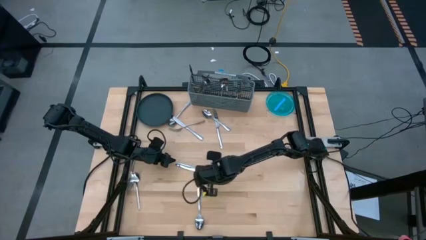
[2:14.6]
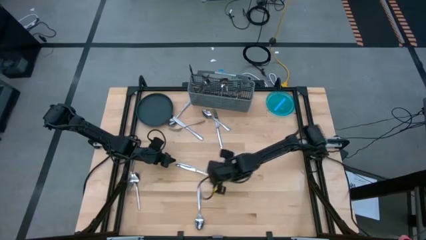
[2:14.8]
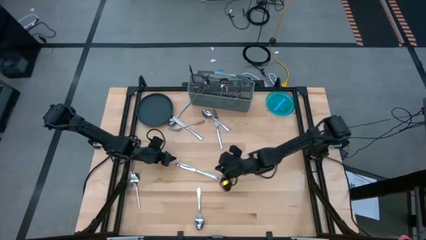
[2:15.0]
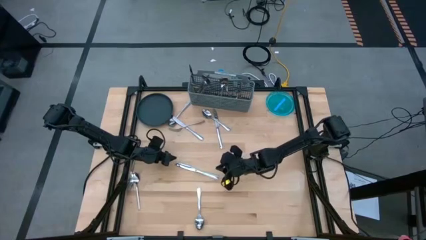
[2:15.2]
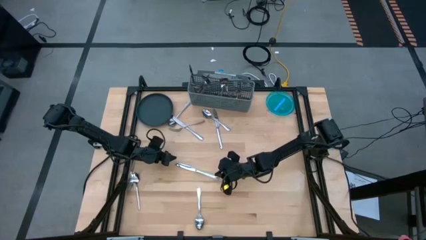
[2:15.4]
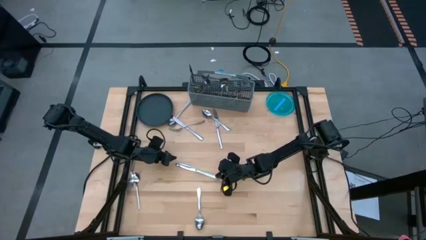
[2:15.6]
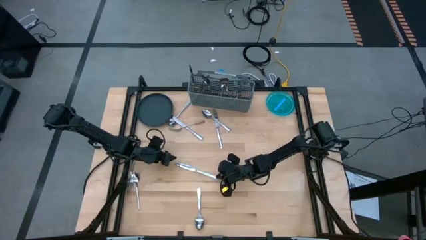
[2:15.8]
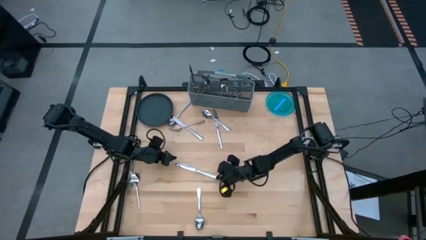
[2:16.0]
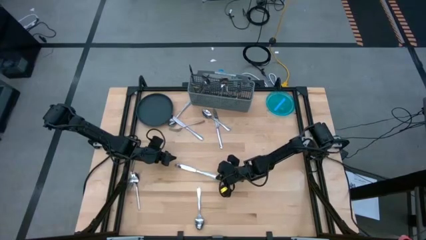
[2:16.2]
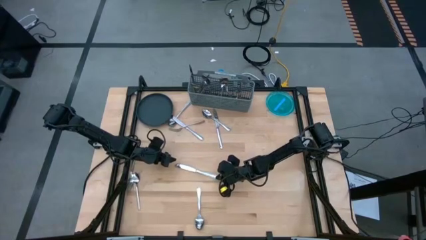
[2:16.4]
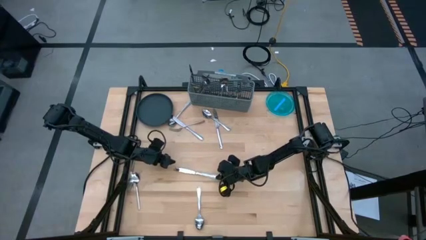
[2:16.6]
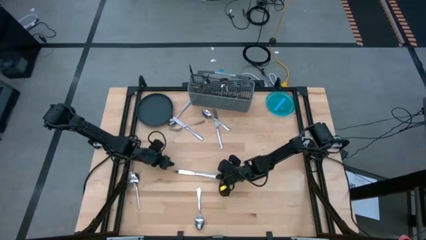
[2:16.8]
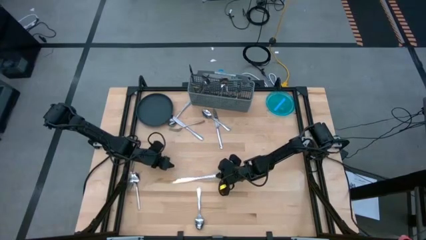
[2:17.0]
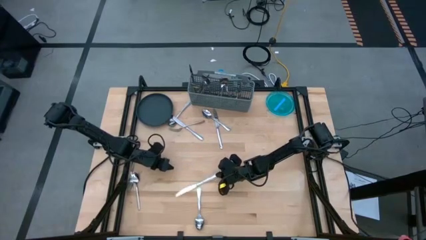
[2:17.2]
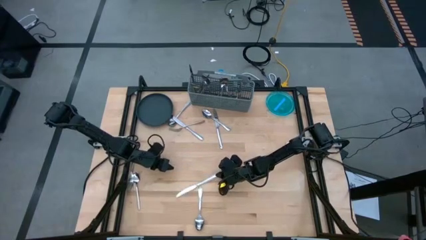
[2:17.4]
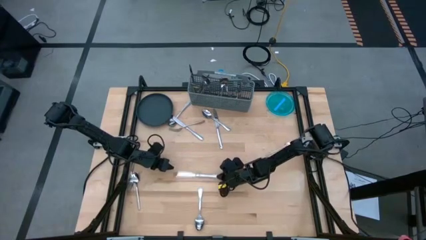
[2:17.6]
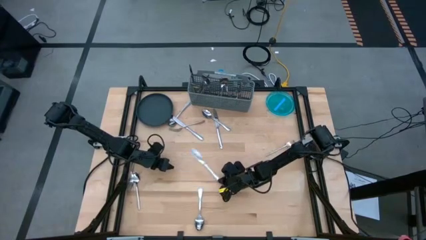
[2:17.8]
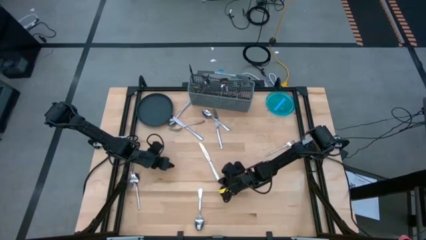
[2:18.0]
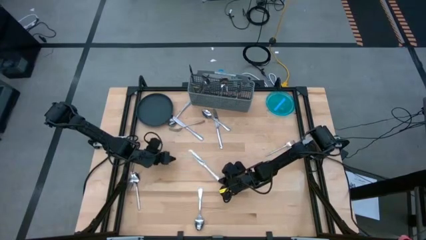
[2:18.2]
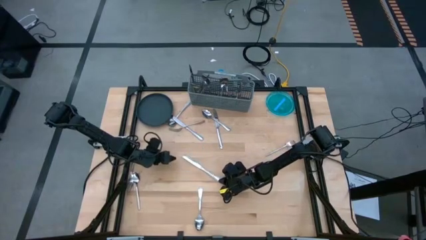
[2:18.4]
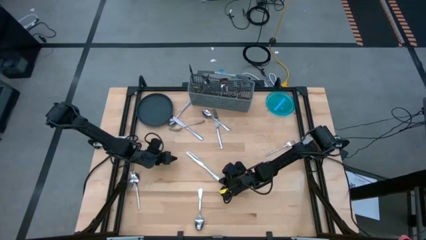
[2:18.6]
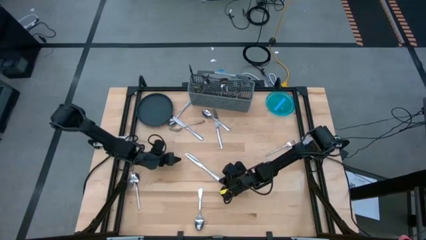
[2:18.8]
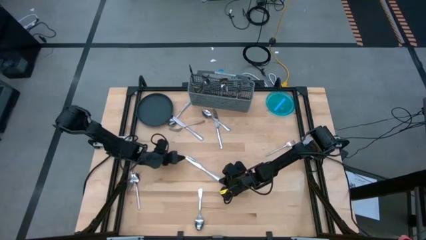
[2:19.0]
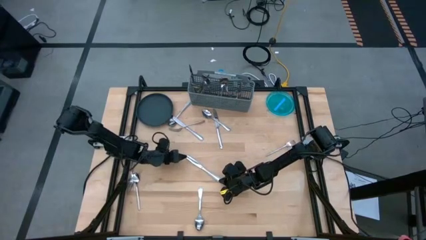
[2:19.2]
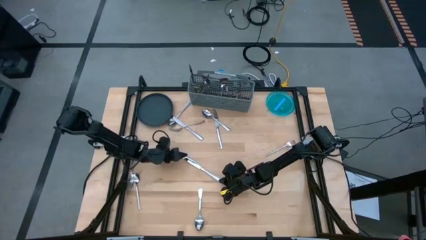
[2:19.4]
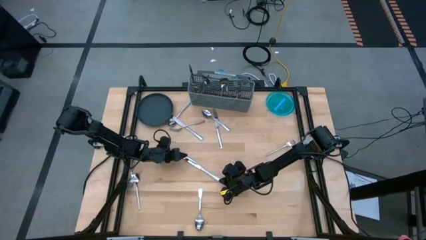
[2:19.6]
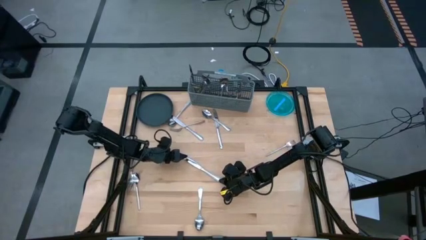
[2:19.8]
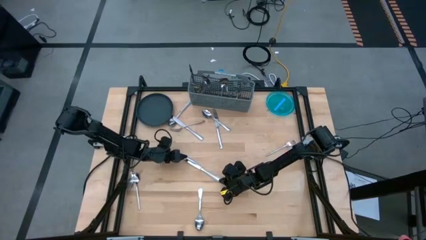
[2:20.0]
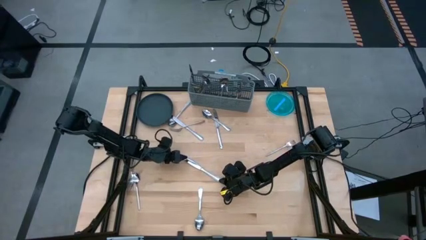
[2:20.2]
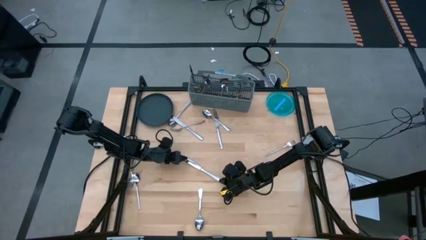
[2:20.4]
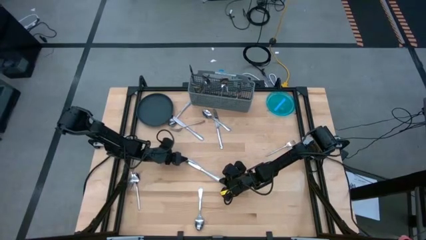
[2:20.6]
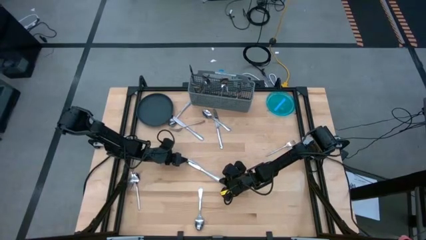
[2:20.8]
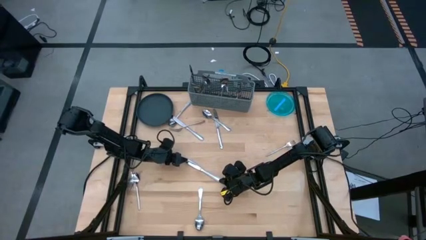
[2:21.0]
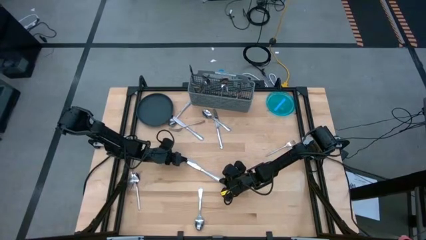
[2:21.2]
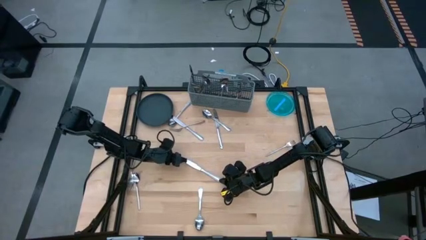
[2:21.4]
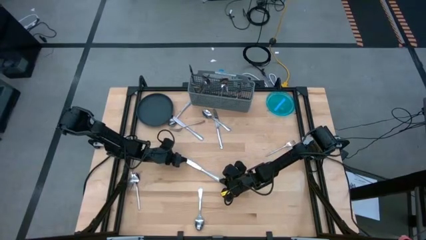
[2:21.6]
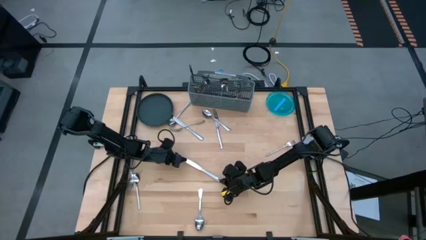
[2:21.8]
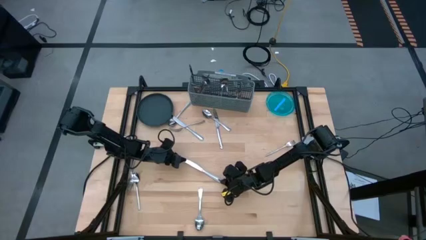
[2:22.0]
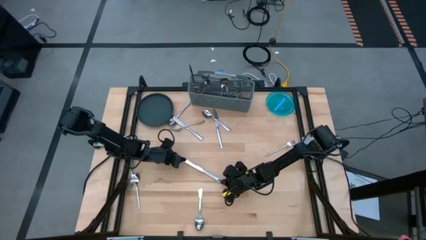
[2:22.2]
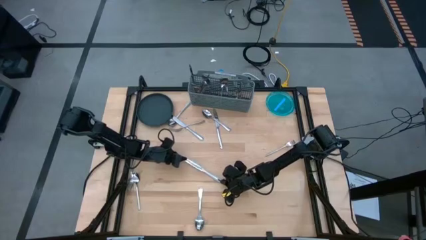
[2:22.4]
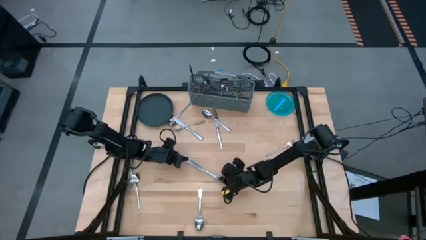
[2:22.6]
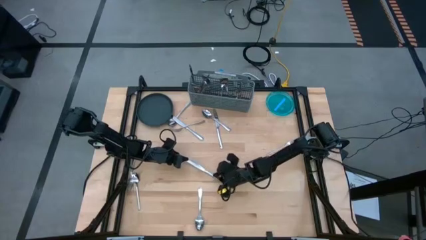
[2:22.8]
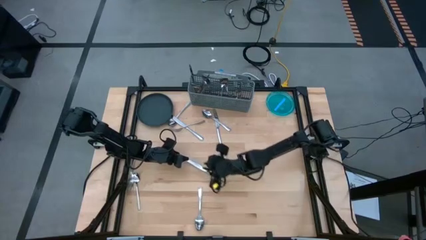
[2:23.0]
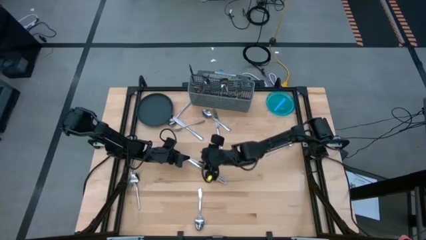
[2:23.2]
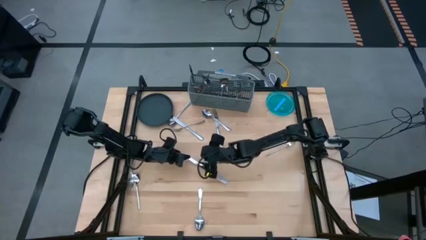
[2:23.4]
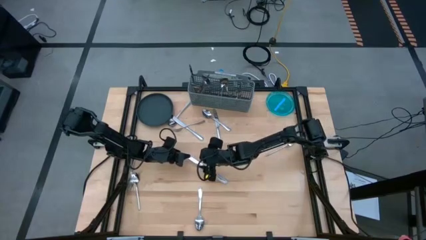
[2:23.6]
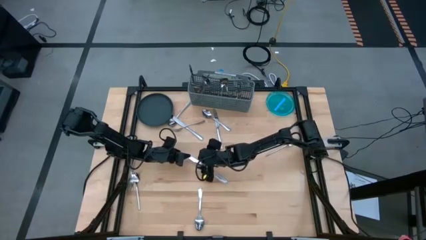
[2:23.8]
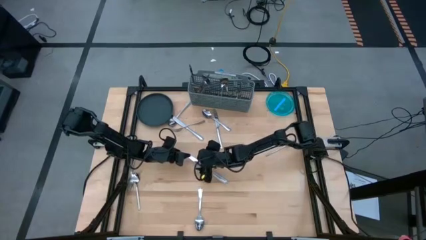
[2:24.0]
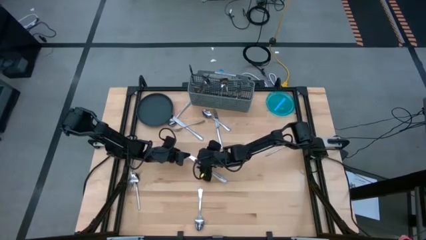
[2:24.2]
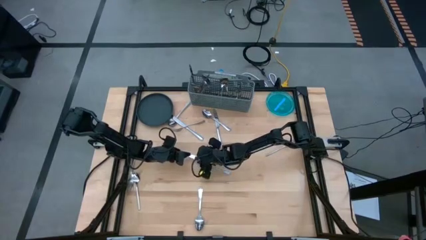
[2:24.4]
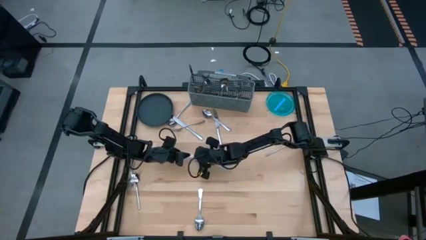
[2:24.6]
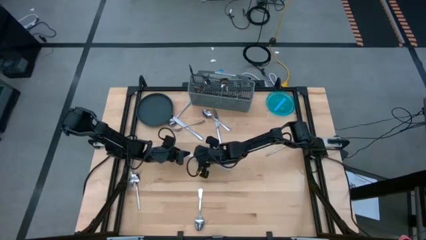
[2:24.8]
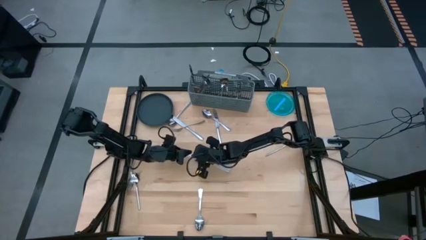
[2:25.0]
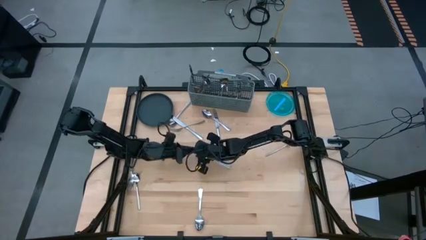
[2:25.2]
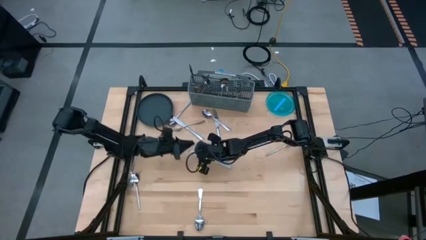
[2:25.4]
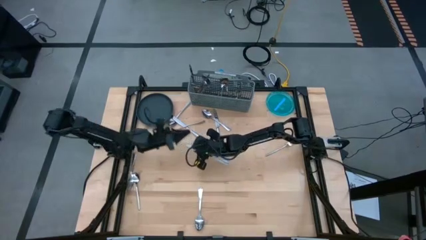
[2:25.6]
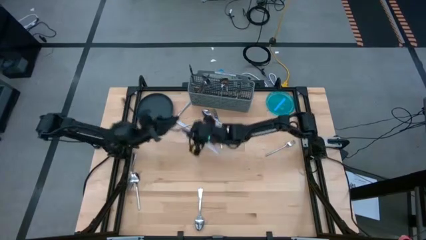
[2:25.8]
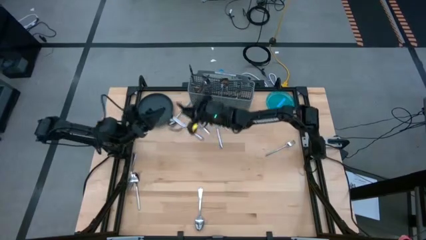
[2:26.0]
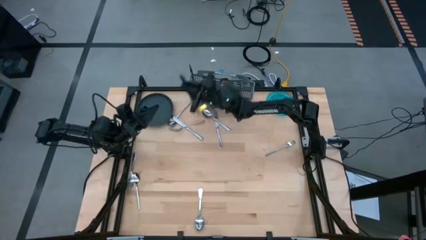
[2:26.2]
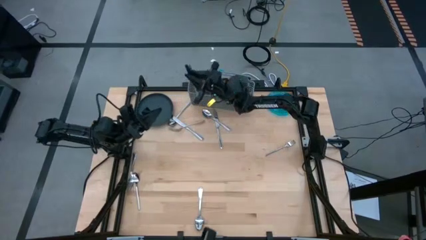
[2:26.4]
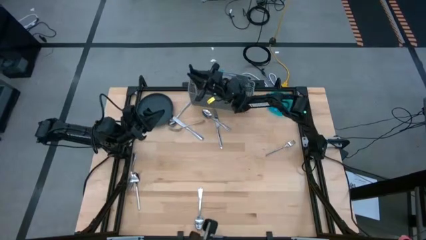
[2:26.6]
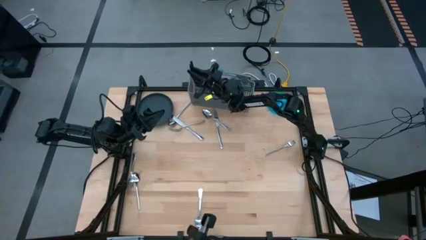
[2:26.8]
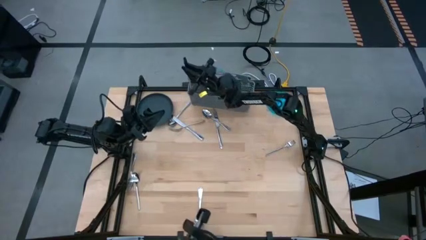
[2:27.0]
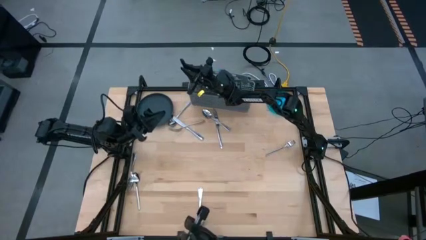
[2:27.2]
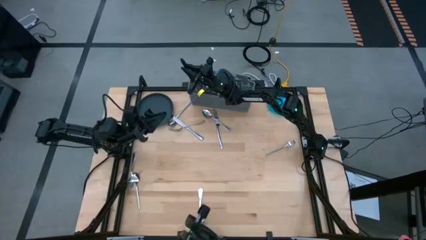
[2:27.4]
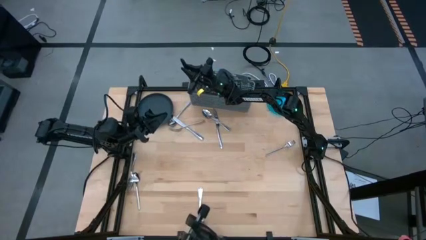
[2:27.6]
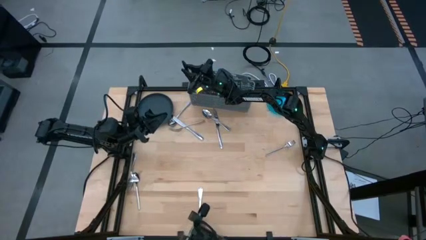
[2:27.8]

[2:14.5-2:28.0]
Task: Sort silverware
Put the knife into the silverware basket

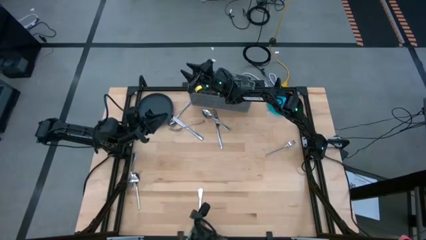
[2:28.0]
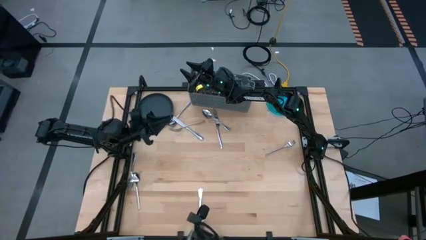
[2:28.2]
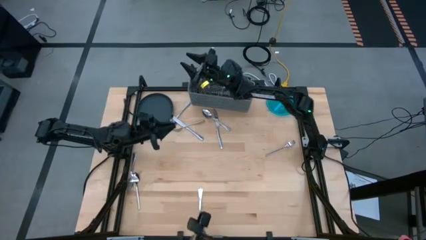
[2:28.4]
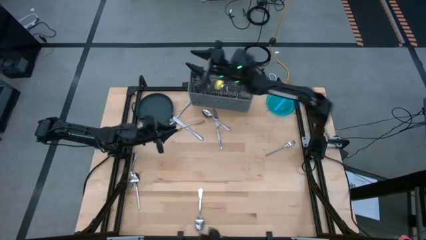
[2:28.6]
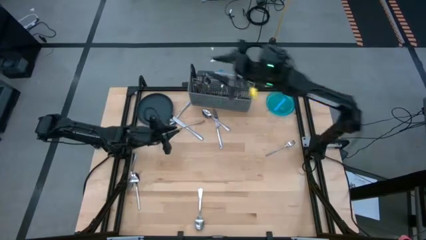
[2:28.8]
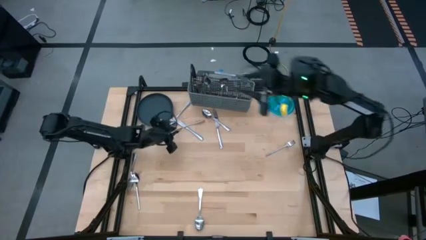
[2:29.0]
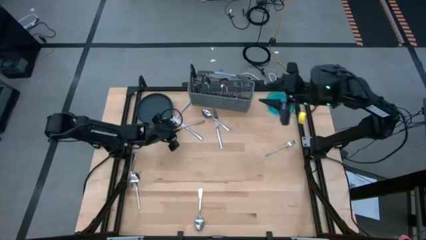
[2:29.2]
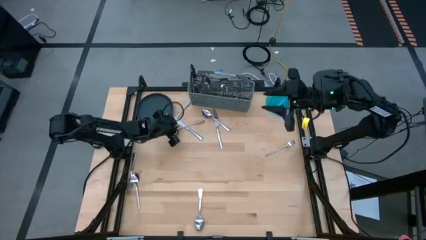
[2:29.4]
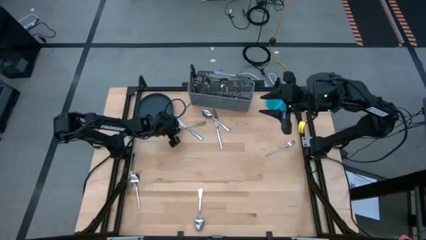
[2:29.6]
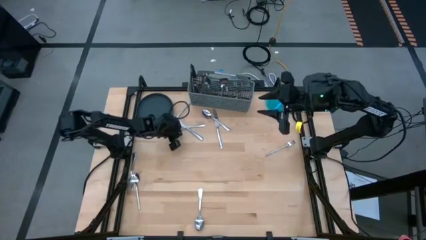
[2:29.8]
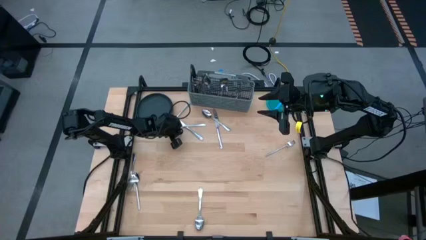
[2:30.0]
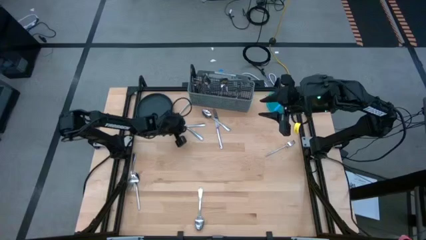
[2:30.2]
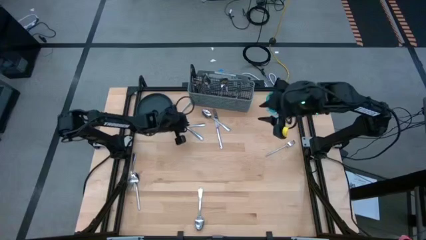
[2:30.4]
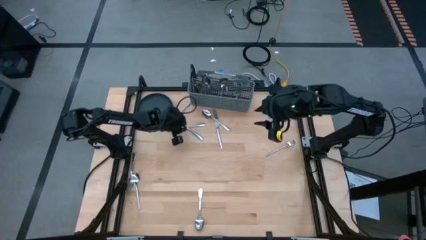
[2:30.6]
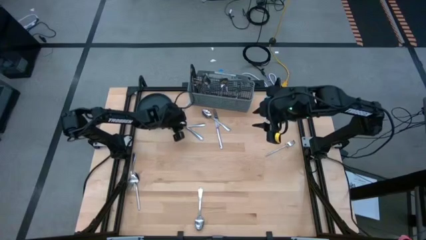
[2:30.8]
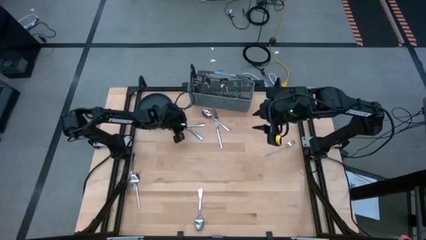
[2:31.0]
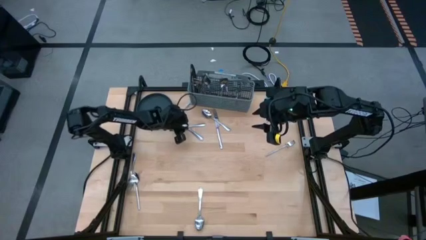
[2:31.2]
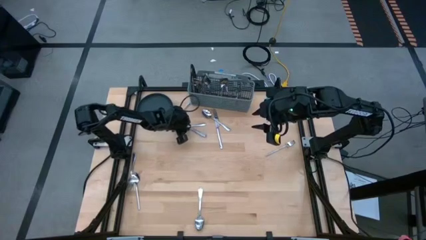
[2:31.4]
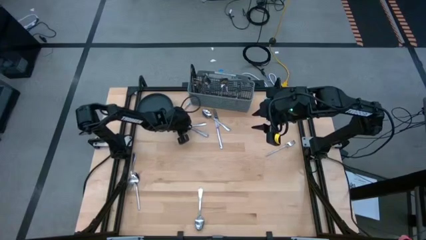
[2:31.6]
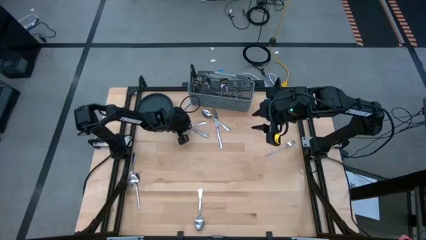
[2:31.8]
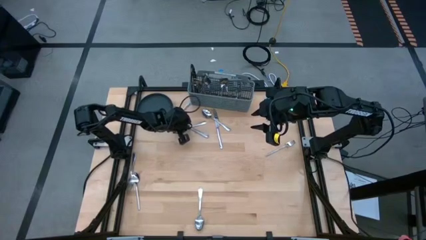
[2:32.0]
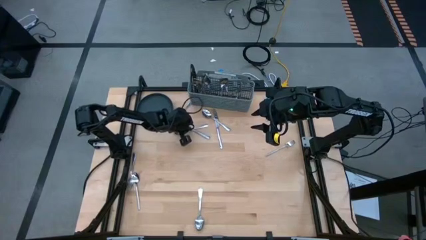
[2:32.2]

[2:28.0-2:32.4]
Put the fork into the silverware basket
